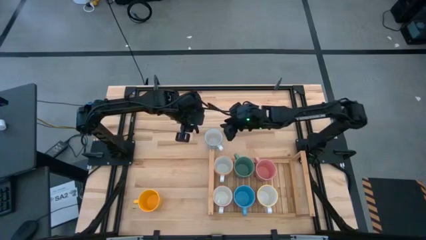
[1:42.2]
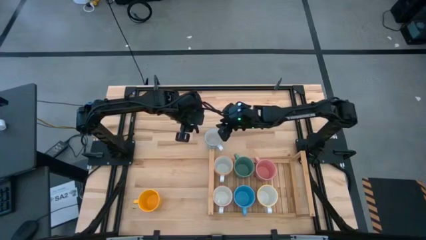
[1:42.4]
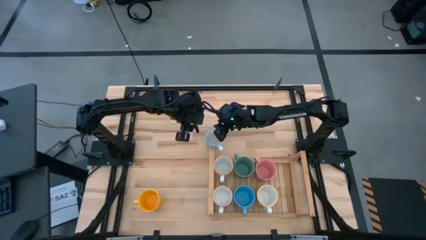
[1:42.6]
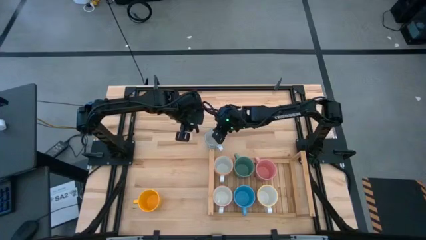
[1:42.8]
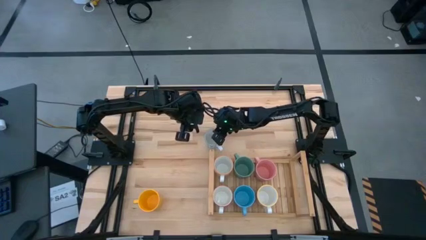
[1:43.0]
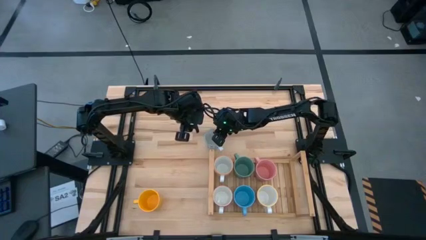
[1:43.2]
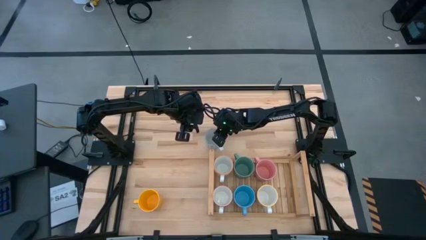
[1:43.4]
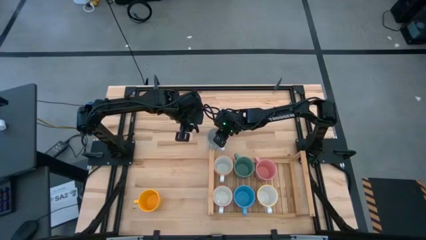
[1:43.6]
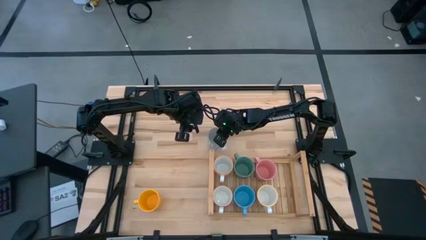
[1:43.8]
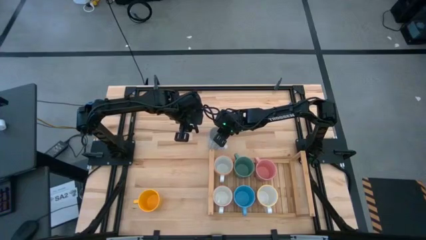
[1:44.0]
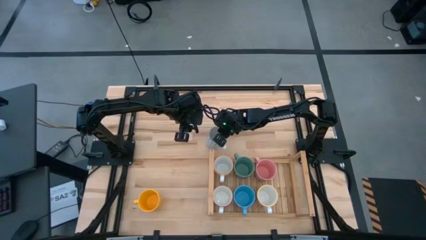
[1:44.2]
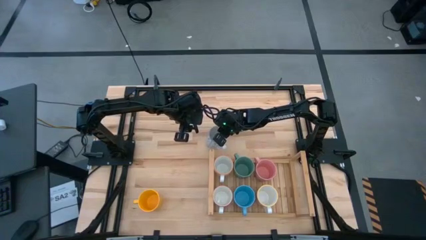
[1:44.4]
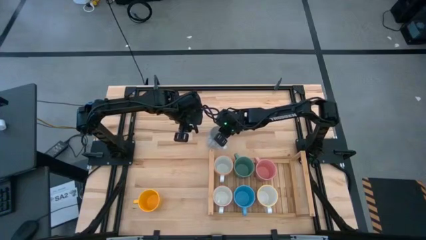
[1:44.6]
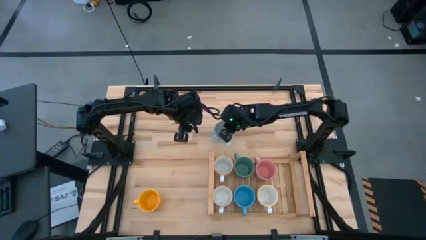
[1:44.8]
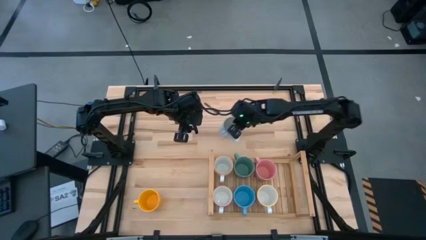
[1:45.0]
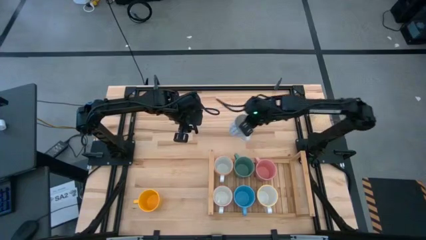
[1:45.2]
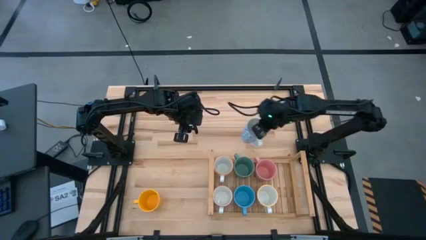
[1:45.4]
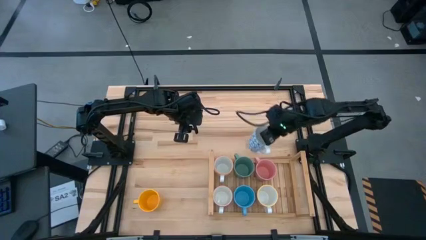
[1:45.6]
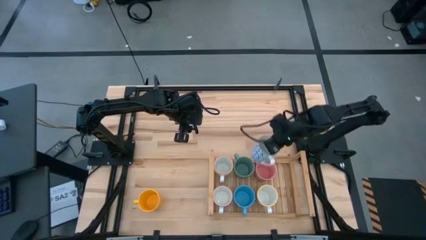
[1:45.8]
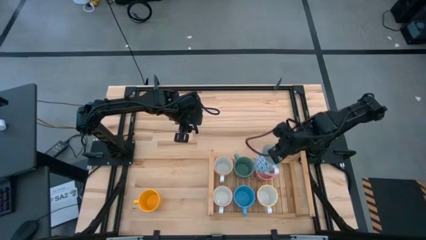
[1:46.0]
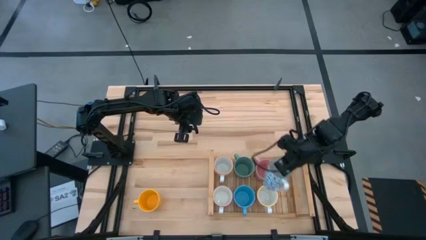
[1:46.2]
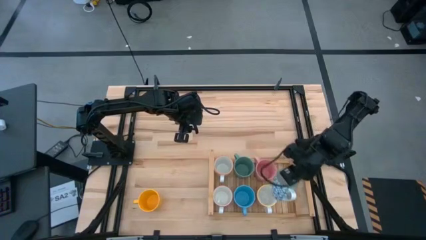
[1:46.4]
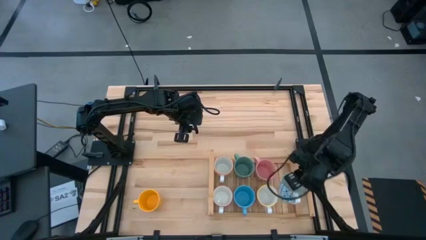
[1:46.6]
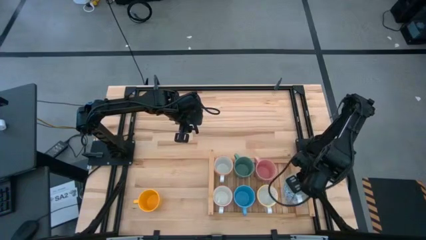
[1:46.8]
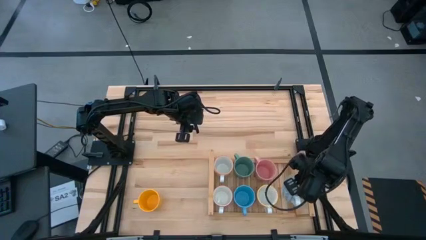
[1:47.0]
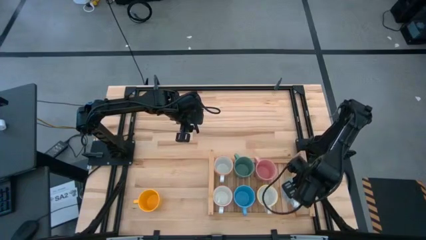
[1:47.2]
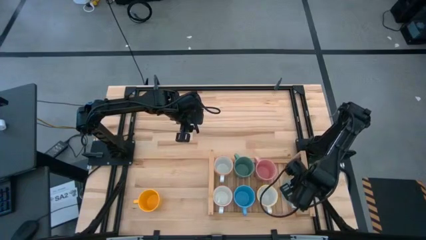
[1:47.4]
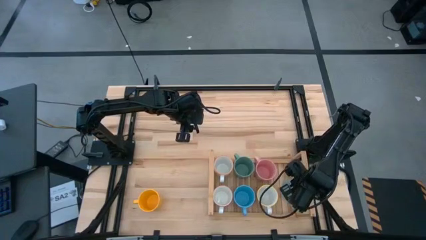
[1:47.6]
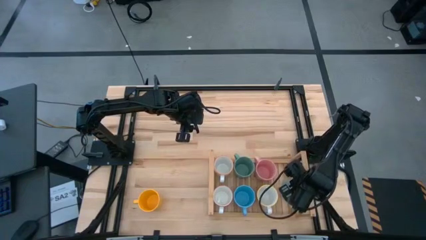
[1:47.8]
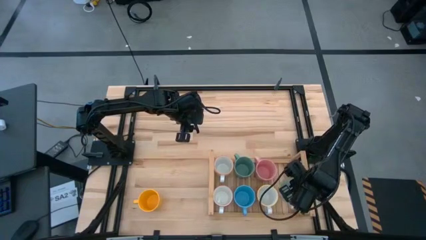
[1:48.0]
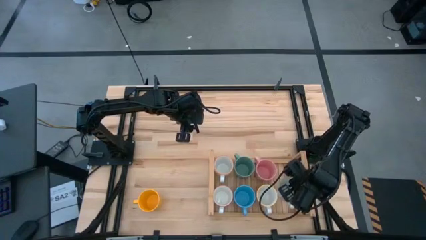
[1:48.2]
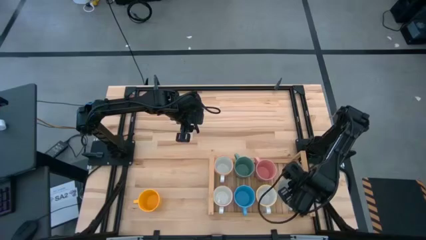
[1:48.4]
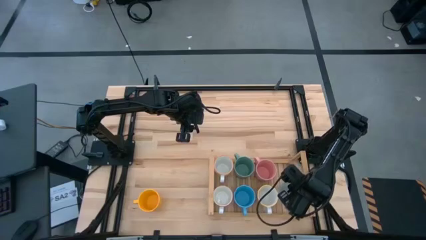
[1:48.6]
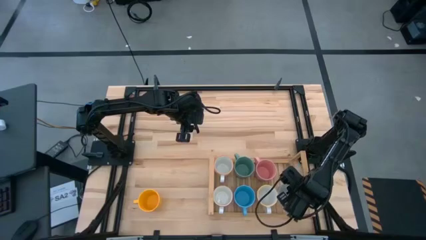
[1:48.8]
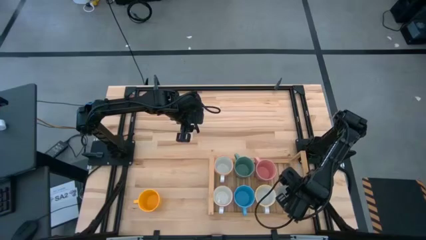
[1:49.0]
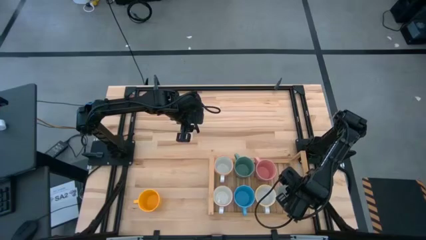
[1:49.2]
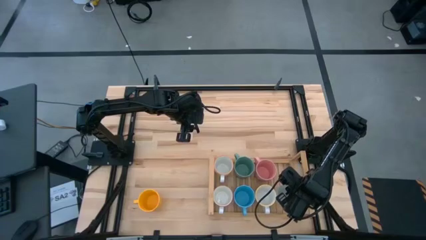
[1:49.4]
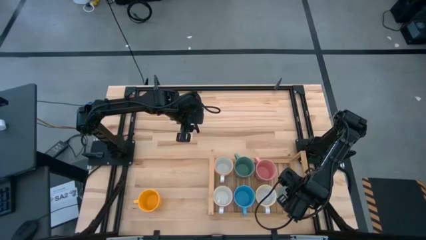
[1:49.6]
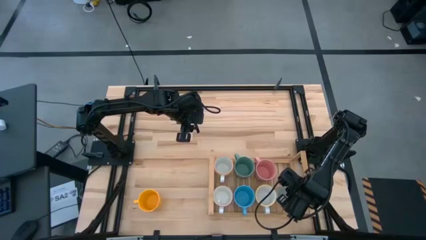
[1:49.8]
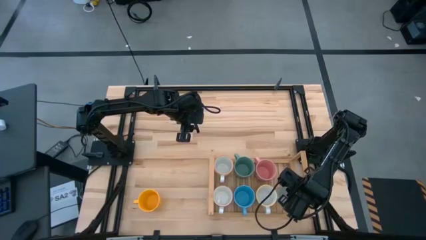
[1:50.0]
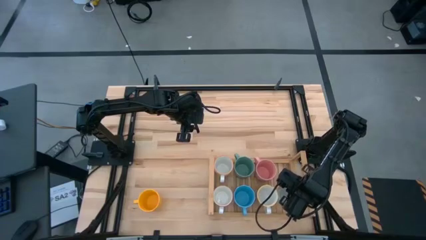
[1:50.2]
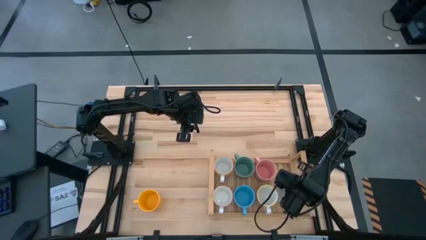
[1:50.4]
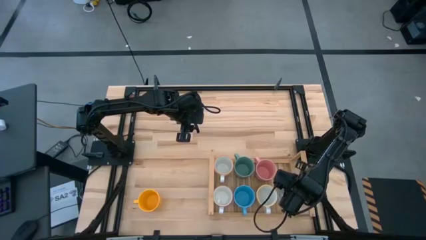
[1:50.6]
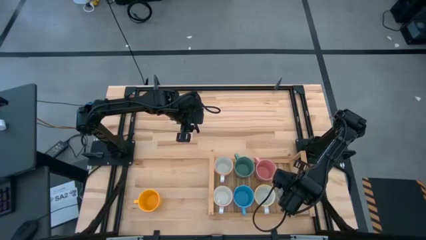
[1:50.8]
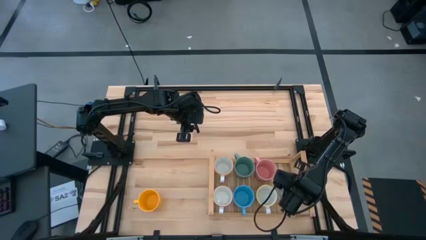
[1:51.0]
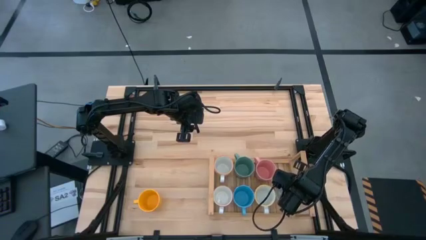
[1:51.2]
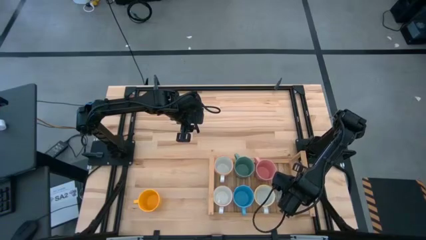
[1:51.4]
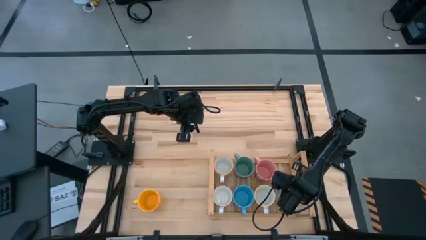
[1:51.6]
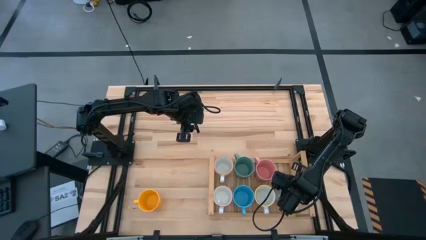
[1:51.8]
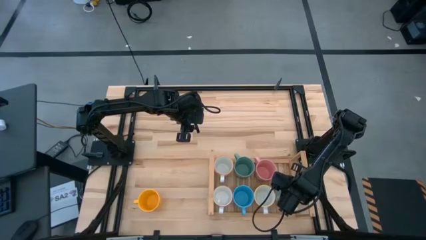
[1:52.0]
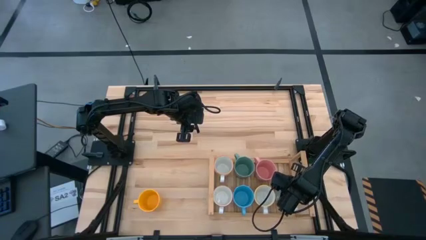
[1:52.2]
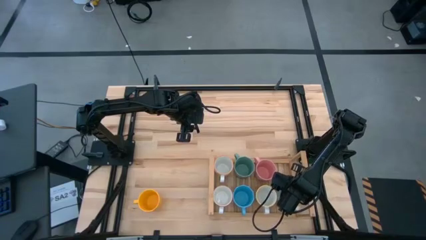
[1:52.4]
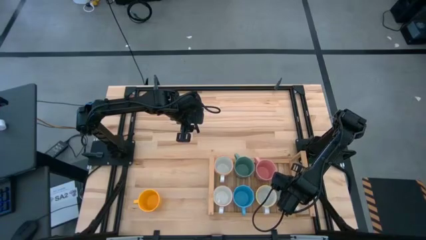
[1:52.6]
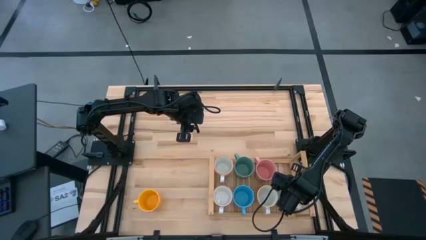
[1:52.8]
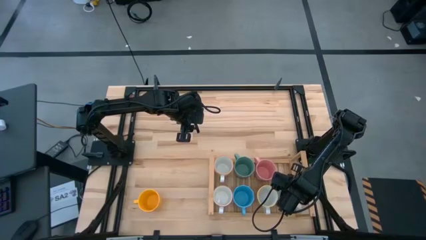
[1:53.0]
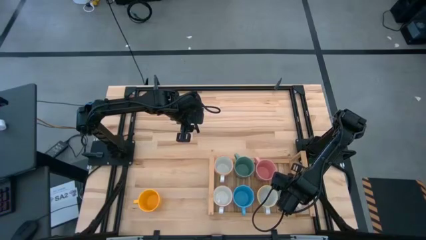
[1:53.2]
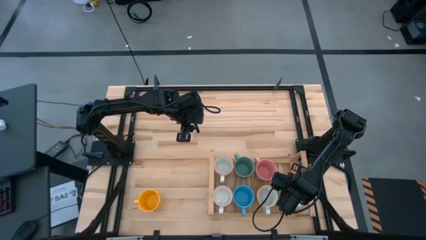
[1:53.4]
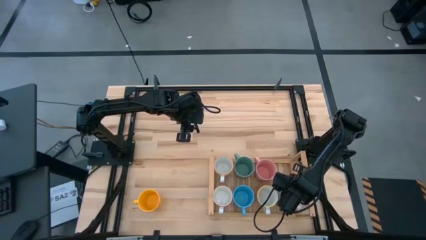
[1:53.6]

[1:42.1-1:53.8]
Task: Place coffee mugs
Put the blue patterned mug on the shelf

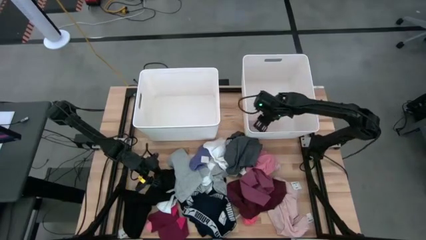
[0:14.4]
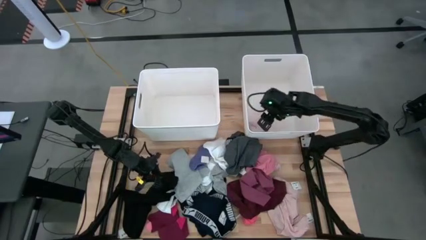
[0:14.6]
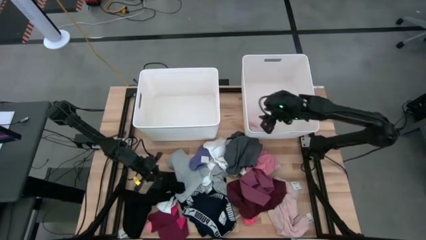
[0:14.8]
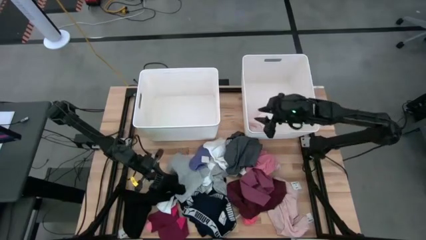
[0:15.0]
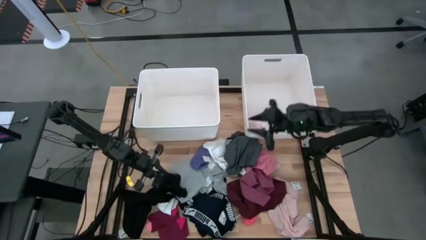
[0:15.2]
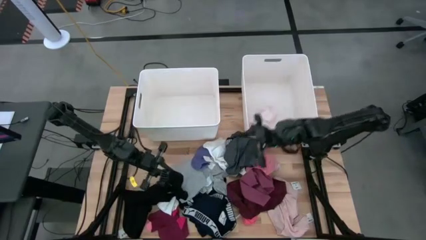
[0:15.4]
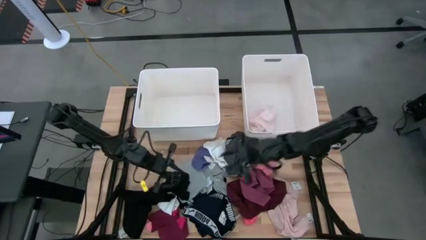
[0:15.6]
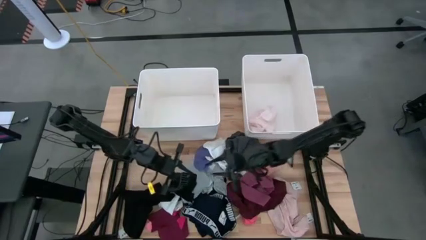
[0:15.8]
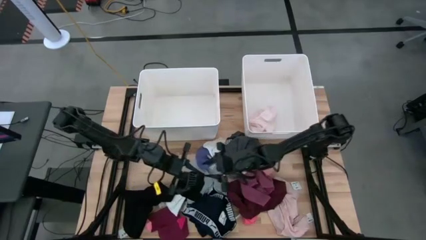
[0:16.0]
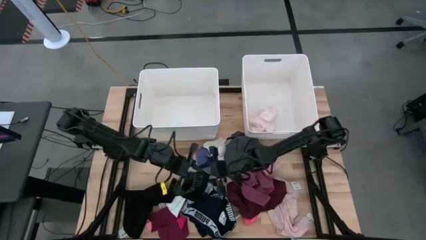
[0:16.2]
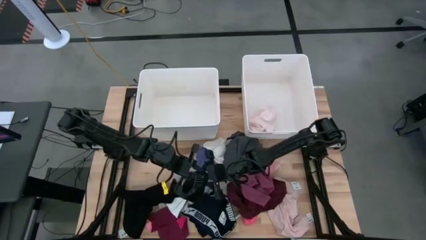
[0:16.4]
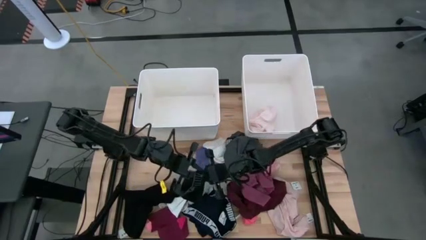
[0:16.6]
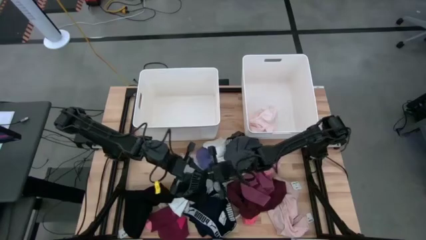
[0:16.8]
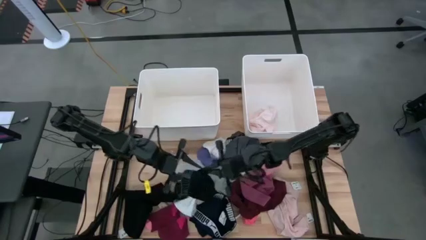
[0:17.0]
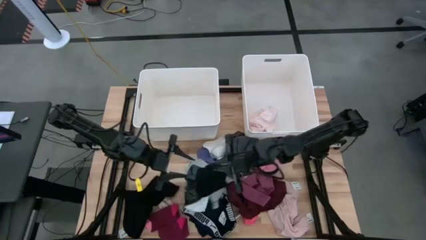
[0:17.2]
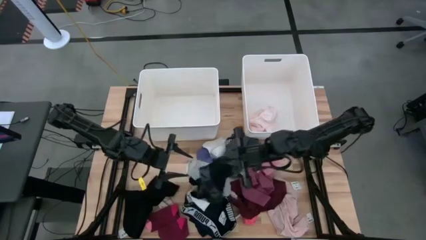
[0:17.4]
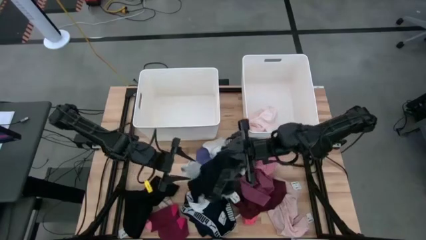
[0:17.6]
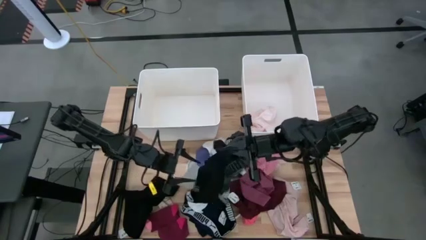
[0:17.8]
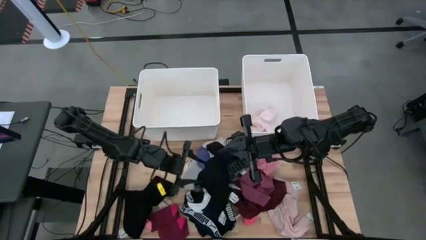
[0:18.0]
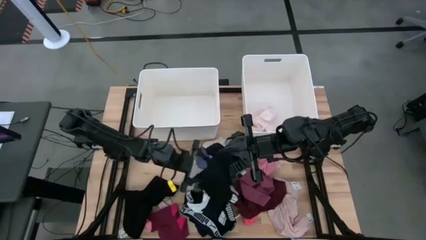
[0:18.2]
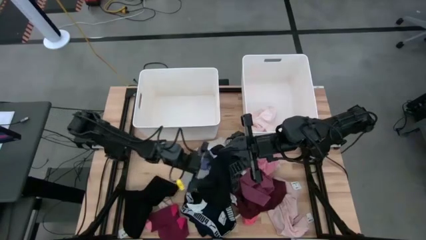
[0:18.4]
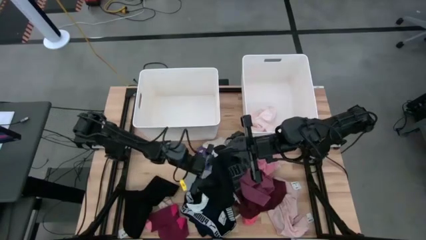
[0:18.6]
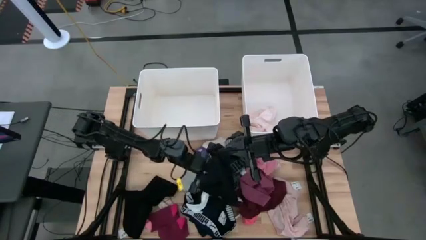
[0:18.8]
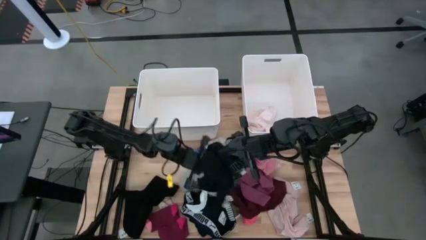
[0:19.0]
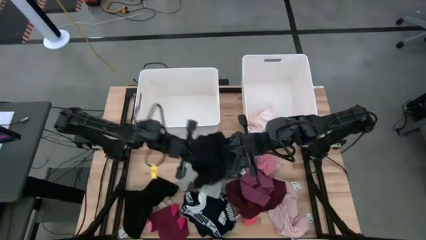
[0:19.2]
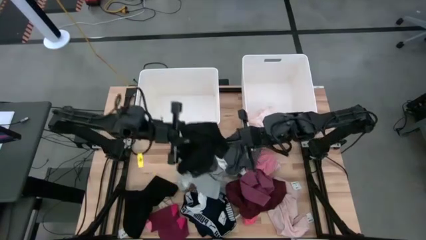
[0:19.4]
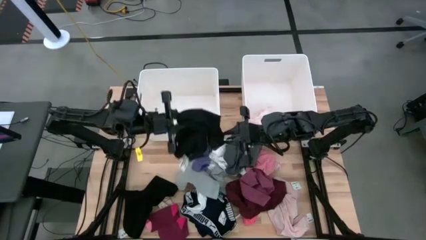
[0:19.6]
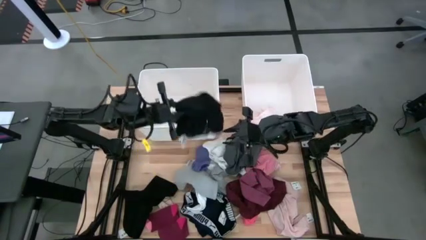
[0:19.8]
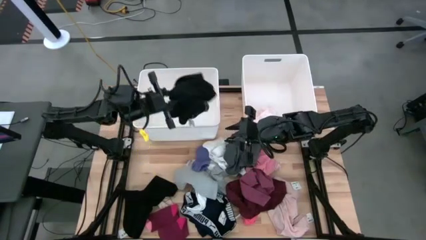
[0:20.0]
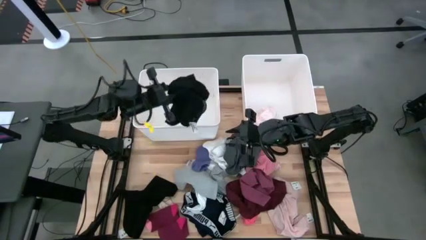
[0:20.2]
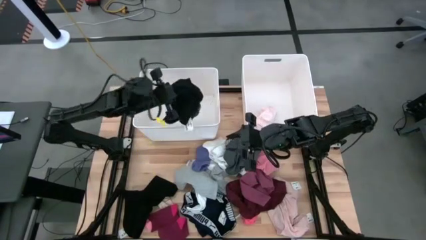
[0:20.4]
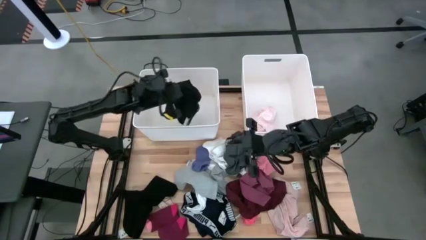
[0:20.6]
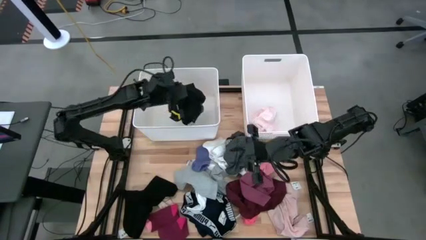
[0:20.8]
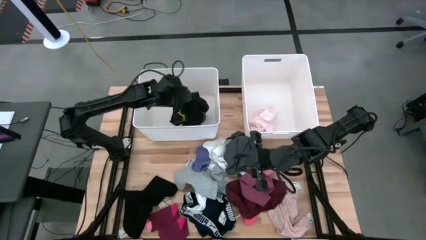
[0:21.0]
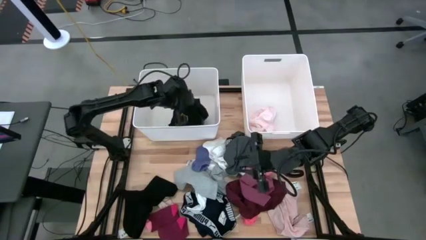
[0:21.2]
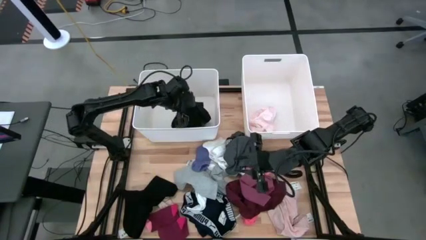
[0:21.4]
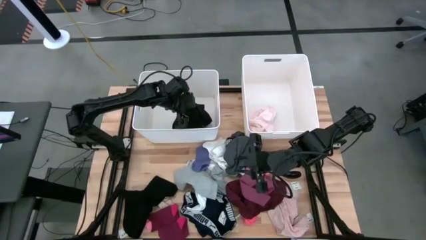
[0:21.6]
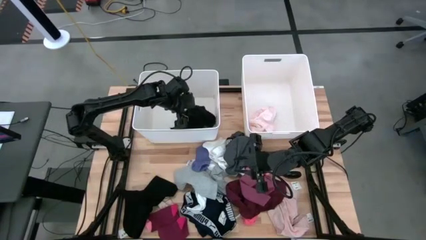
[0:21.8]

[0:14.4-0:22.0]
Task: Sort clothes
Put the black underwear into the left white laundry organizer
